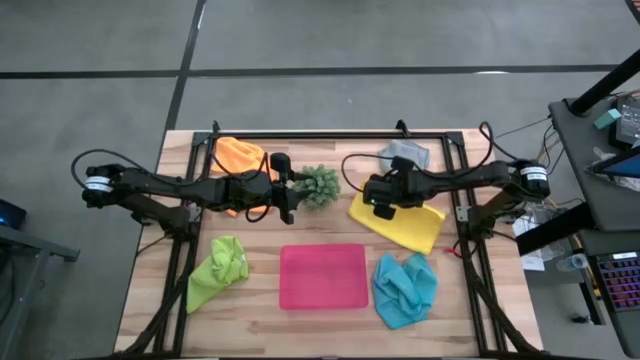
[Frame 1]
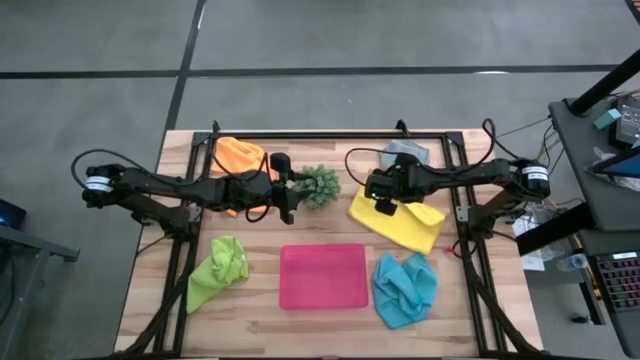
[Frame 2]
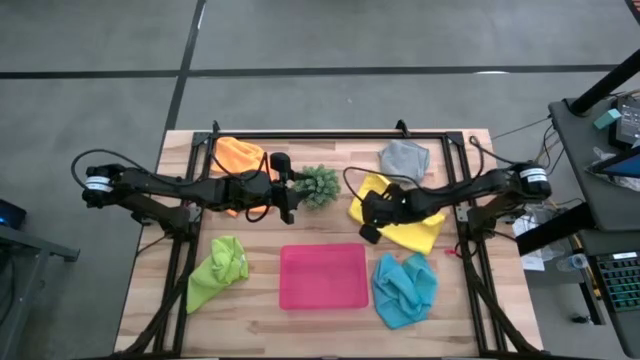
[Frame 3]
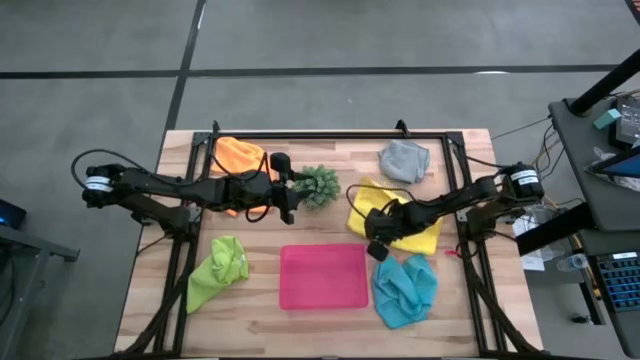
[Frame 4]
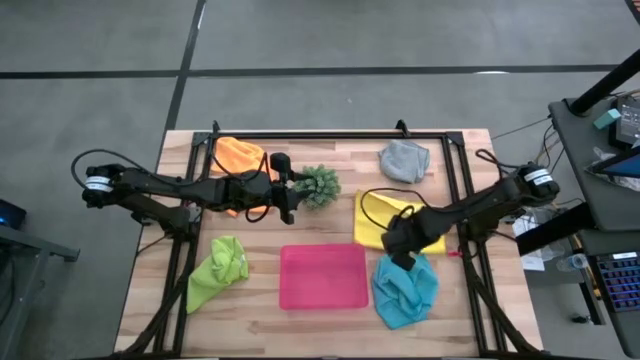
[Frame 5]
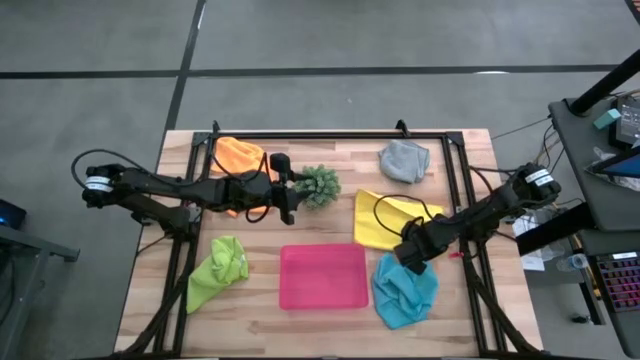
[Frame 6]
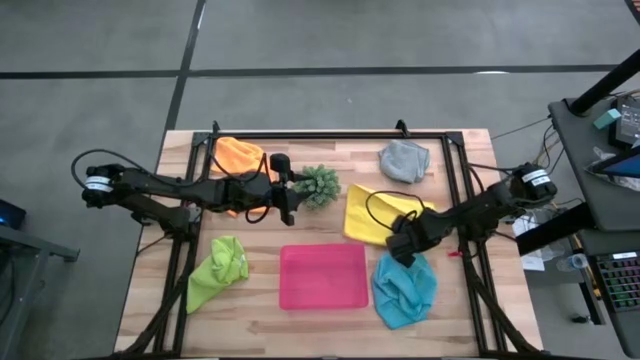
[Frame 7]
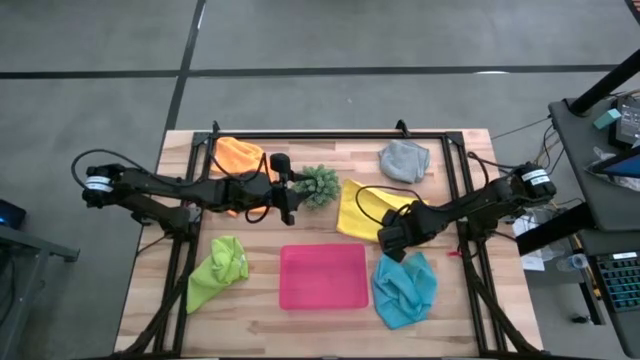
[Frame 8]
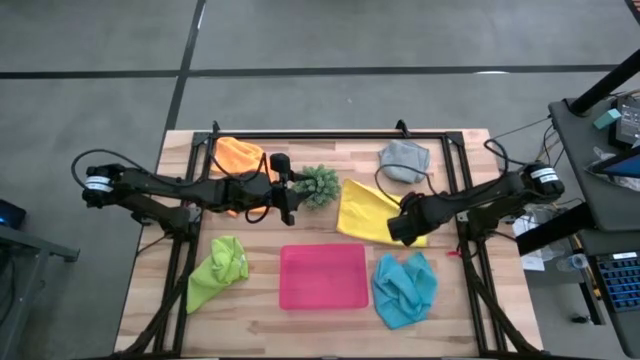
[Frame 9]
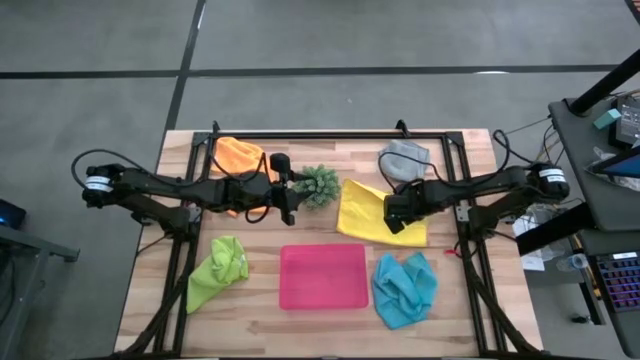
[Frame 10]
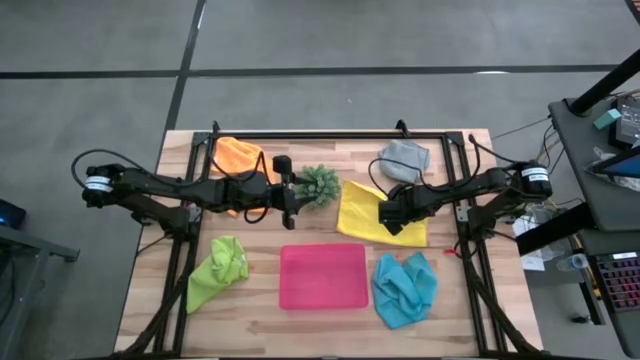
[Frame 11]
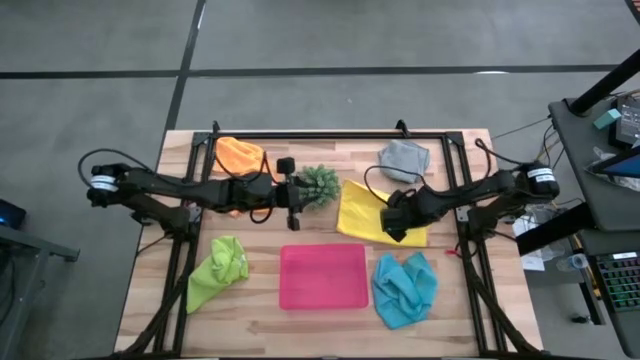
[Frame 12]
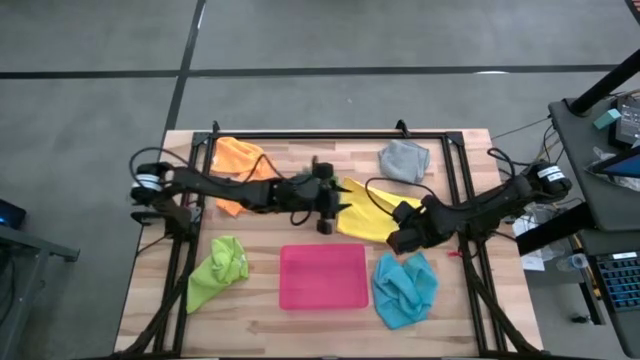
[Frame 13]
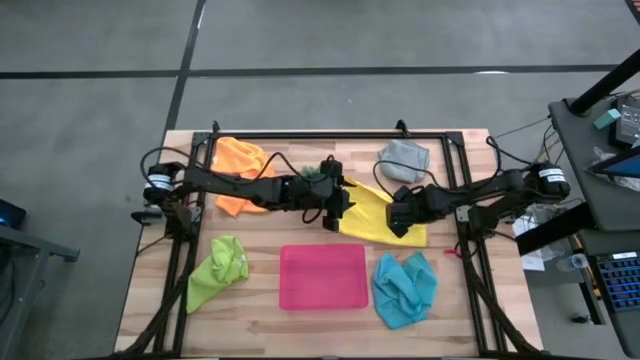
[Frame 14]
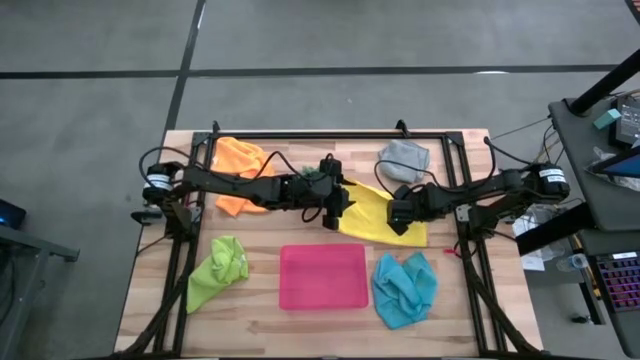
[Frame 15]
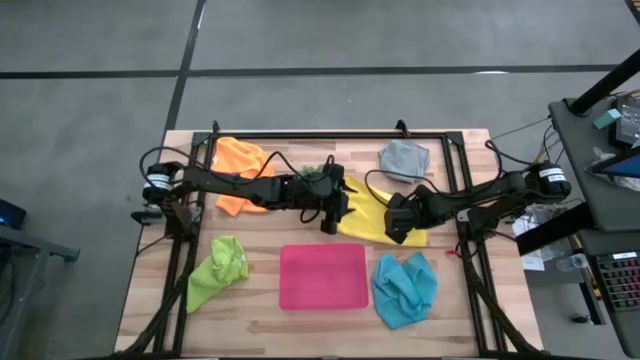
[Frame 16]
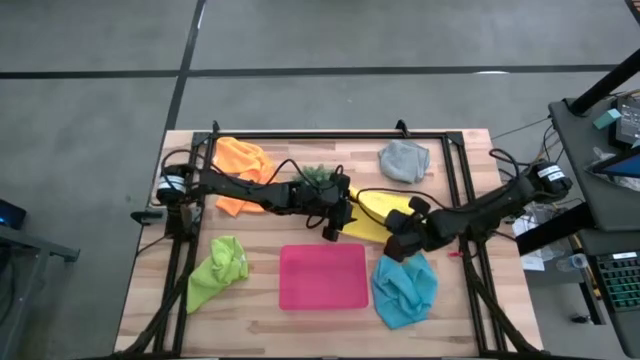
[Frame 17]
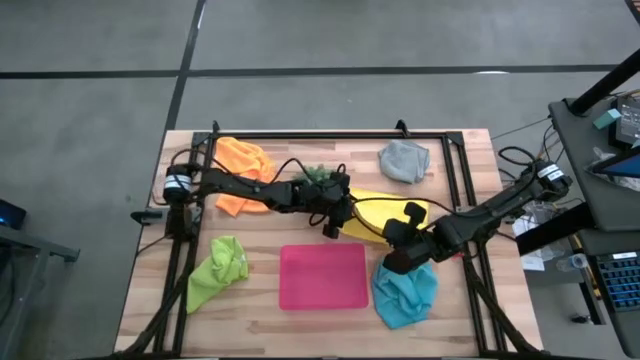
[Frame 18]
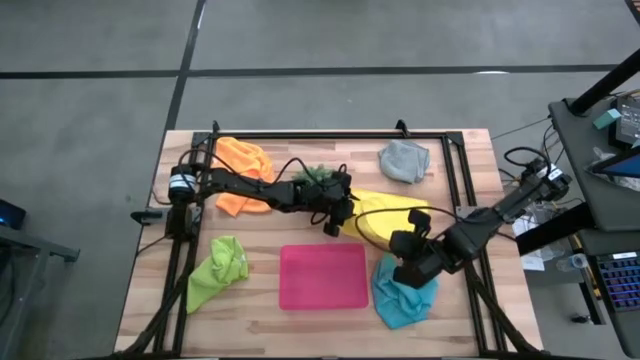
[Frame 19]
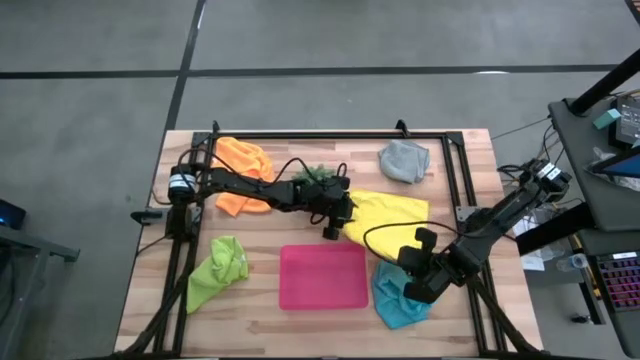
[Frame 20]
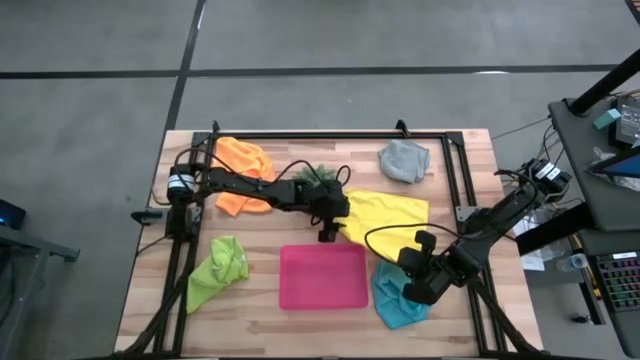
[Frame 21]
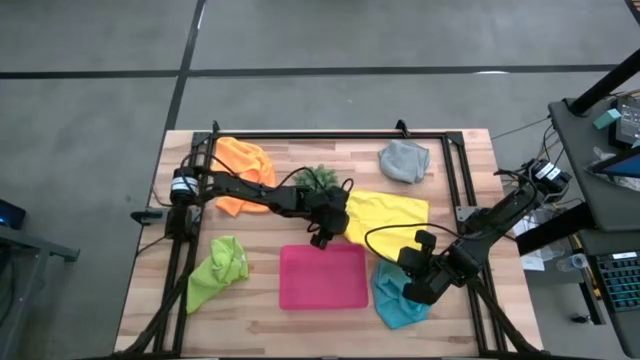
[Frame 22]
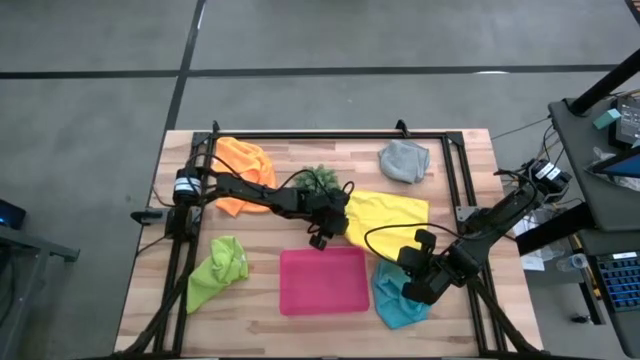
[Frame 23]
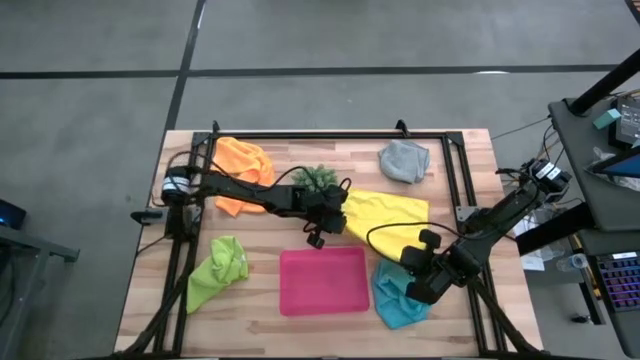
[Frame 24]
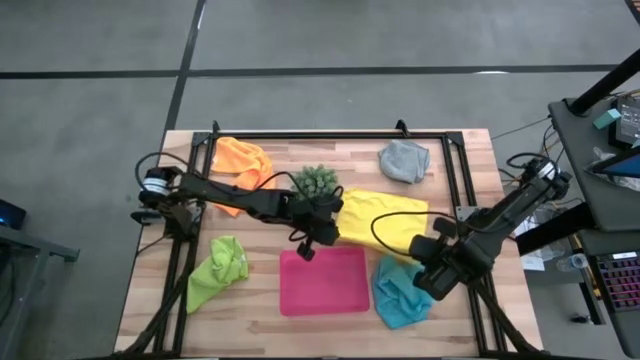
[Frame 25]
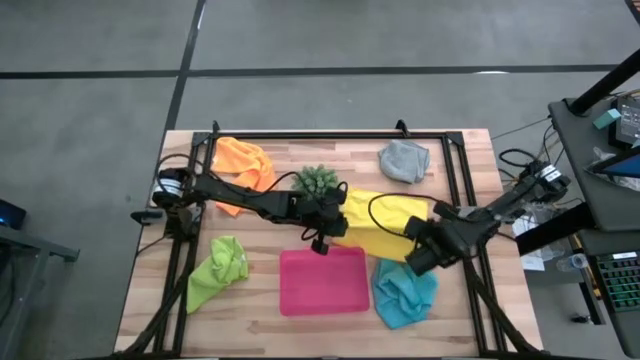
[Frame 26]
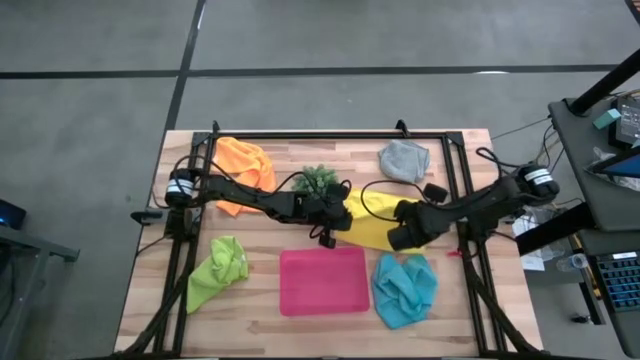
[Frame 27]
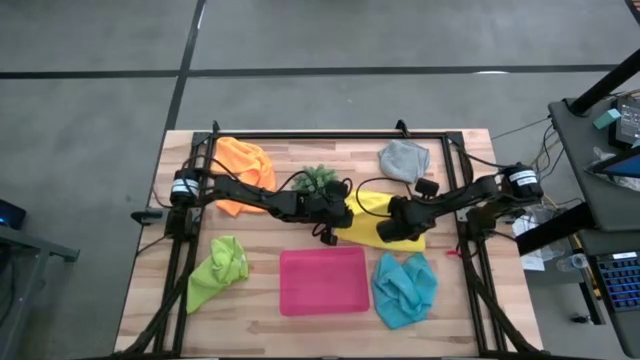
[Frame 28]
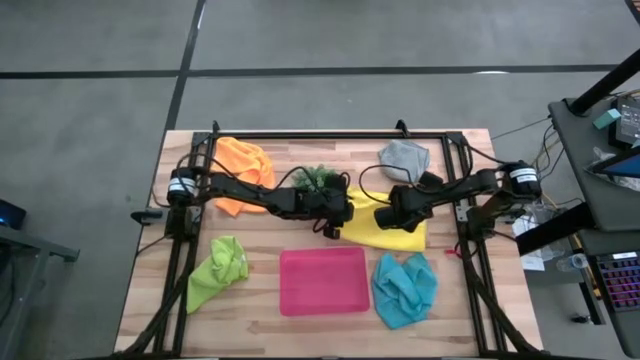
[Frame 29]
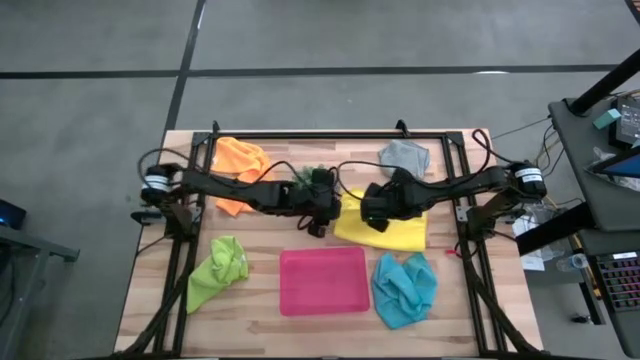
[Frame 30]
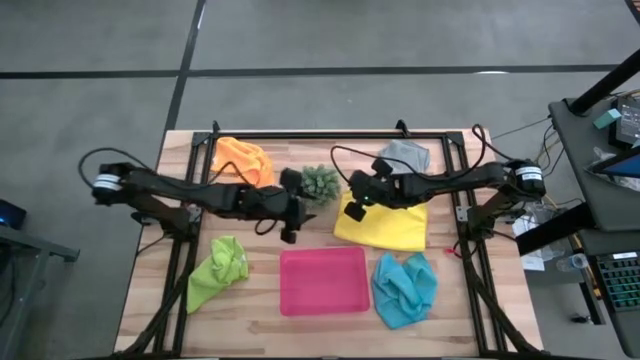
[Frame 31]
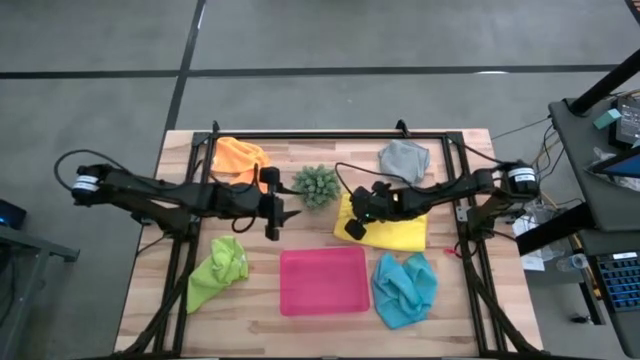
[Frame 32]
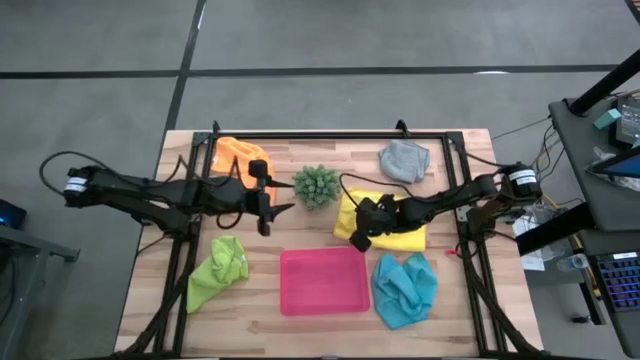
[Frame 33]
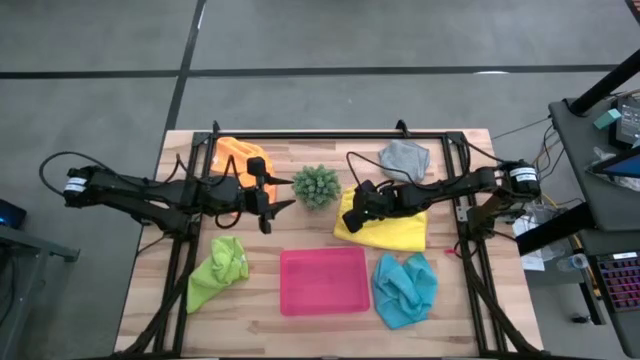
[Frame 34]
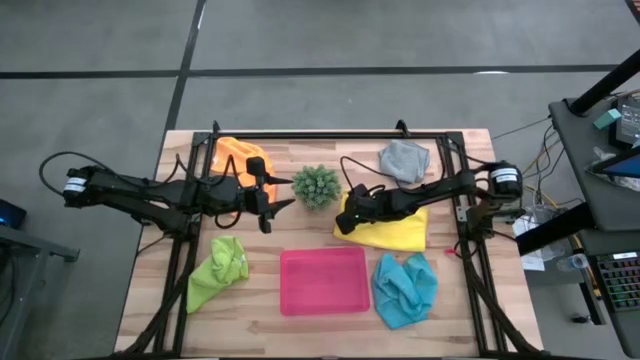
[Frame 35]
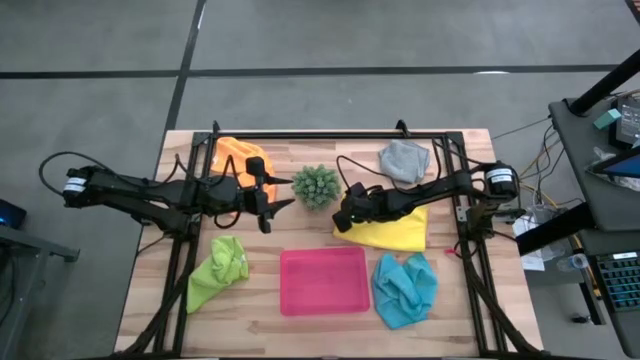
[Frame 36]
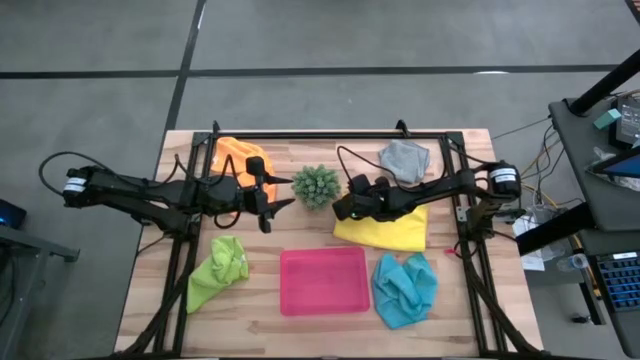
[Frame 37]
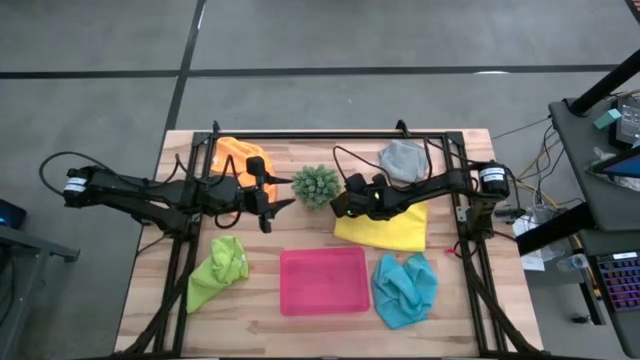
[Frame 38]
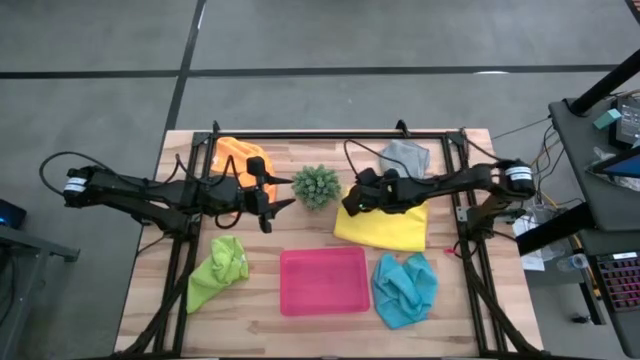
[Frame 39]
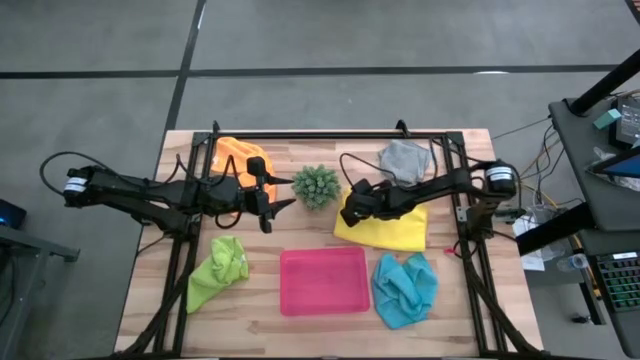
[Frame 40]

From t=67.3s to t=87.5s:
Task: Fold microfiber towels
Fold the yellow microfiber cloth
